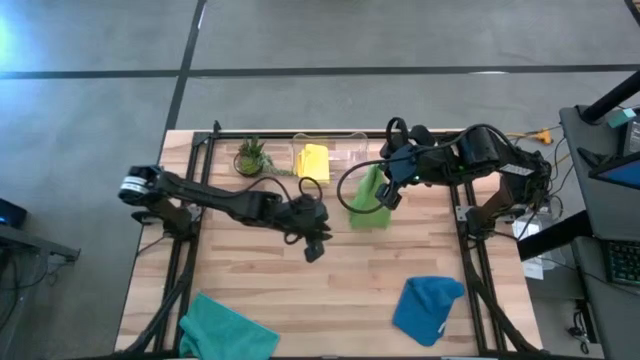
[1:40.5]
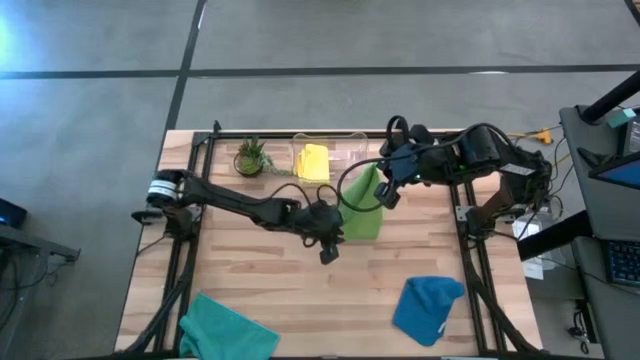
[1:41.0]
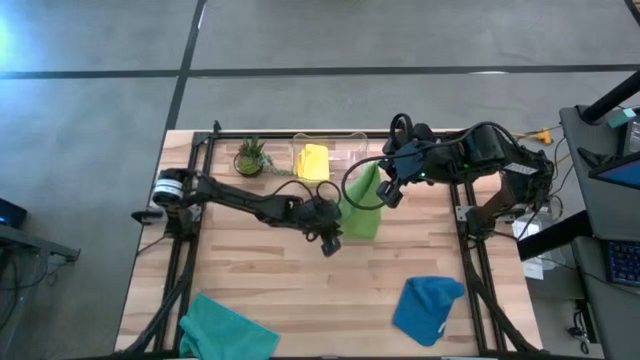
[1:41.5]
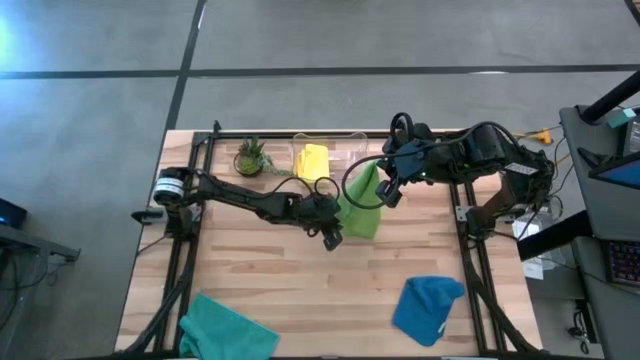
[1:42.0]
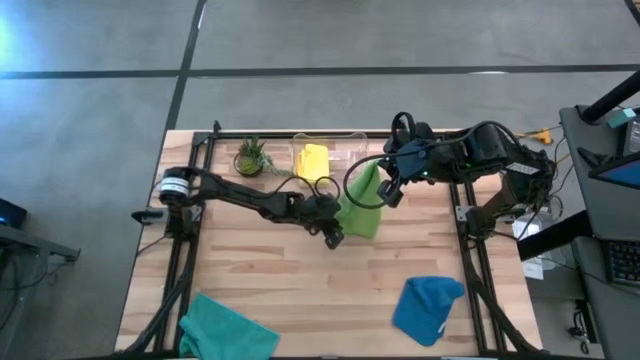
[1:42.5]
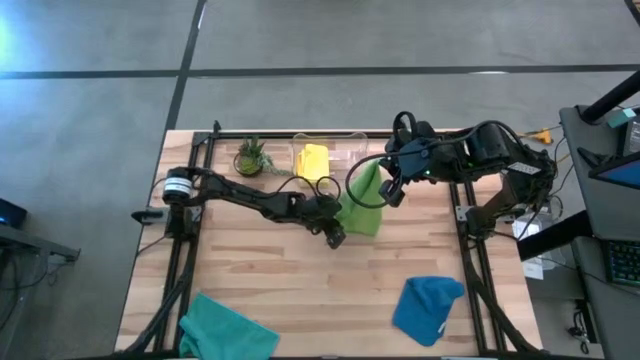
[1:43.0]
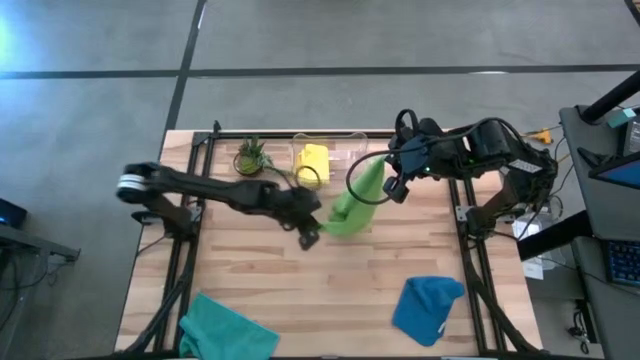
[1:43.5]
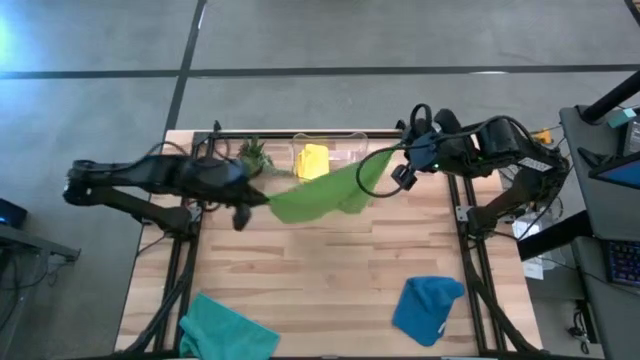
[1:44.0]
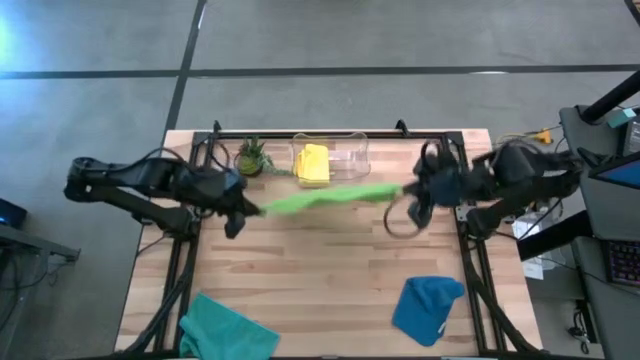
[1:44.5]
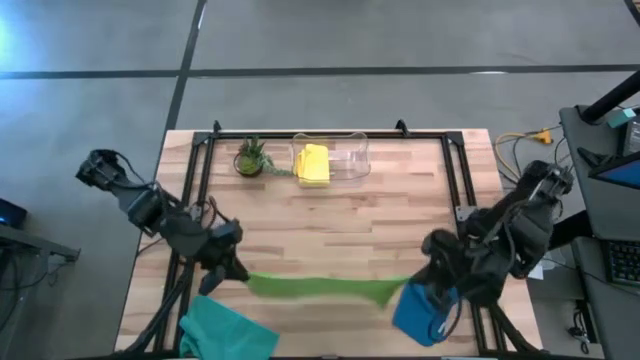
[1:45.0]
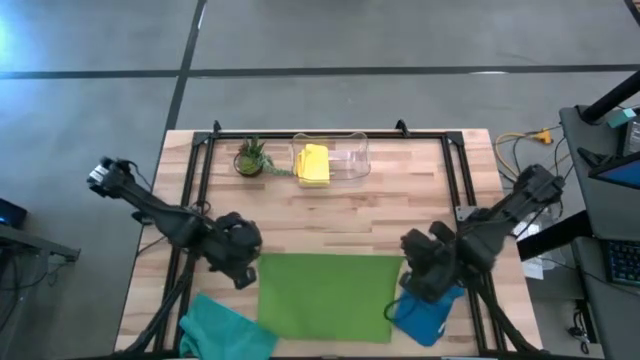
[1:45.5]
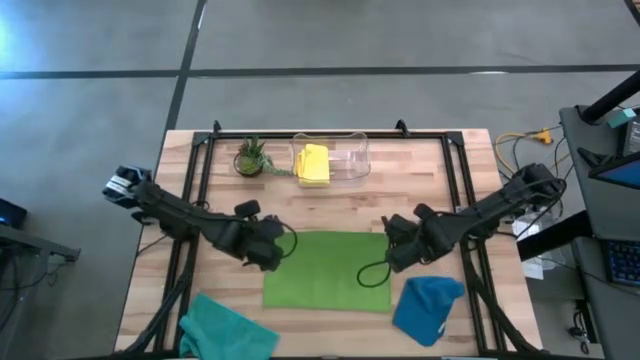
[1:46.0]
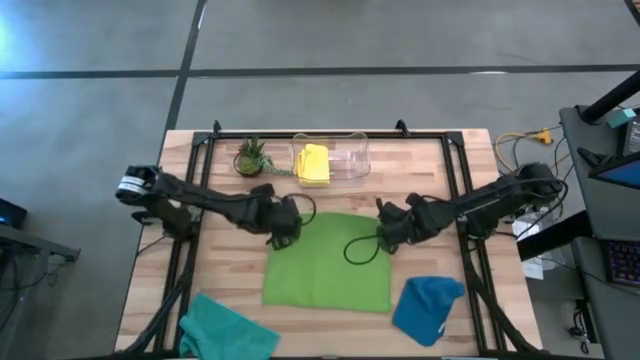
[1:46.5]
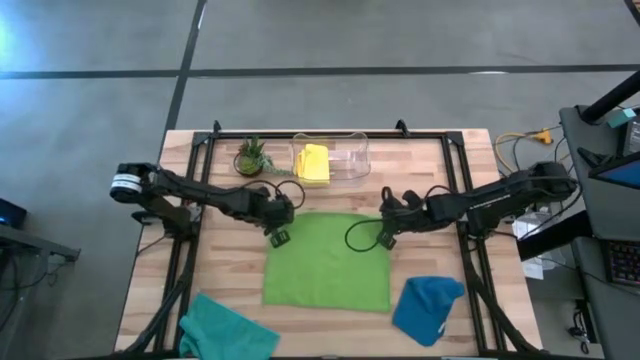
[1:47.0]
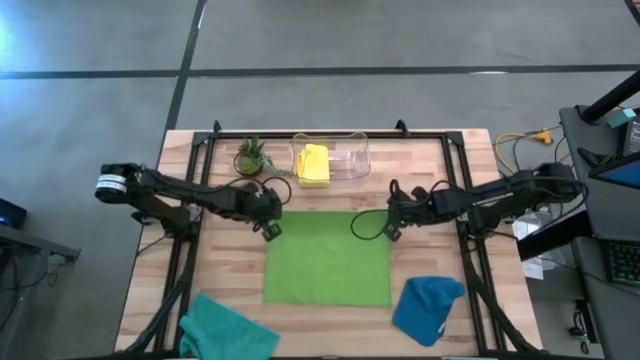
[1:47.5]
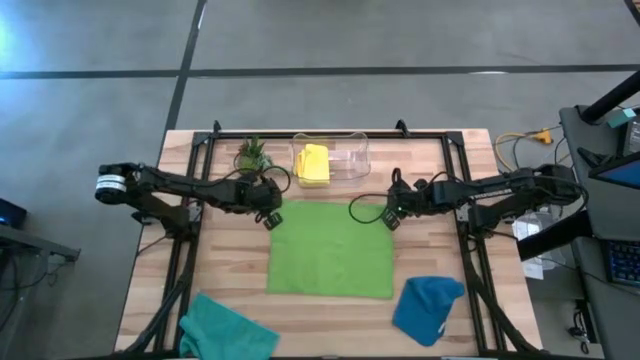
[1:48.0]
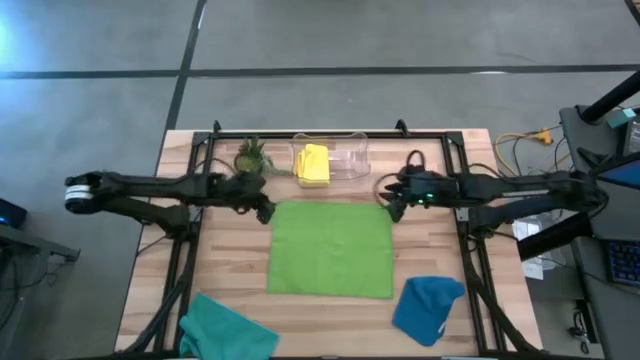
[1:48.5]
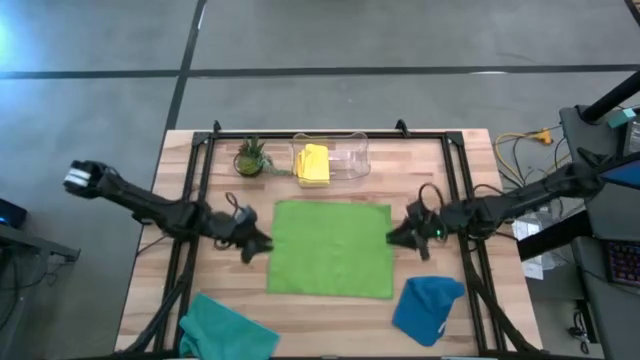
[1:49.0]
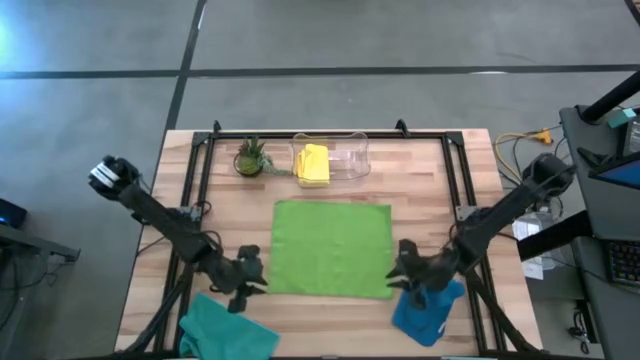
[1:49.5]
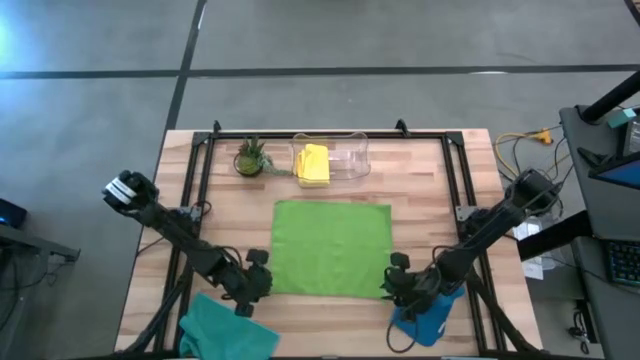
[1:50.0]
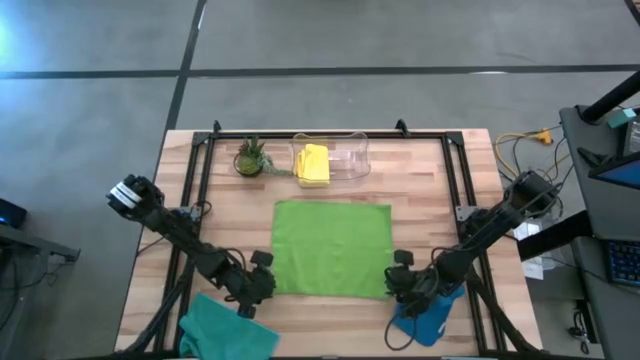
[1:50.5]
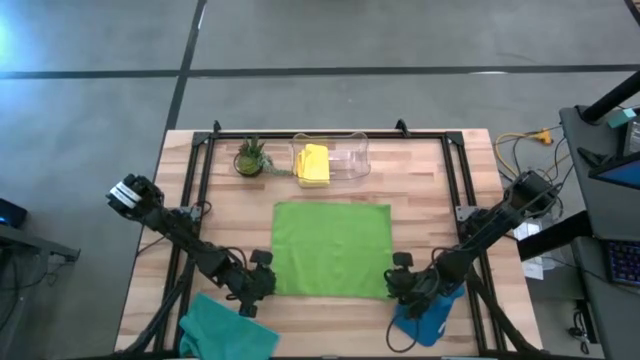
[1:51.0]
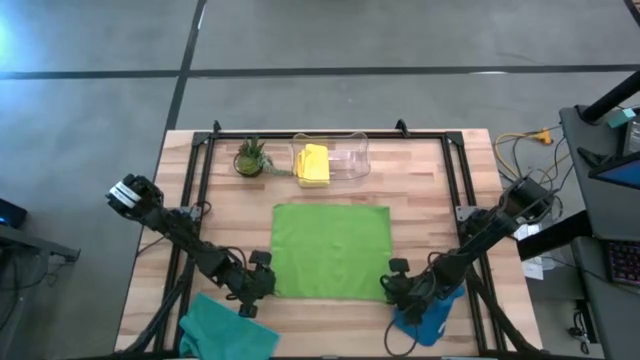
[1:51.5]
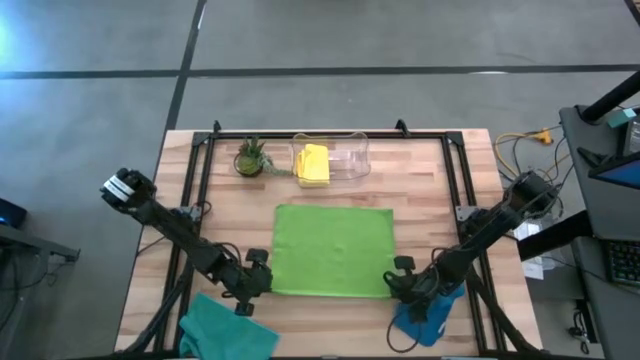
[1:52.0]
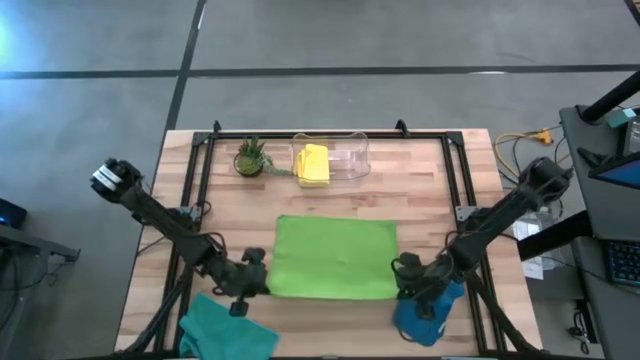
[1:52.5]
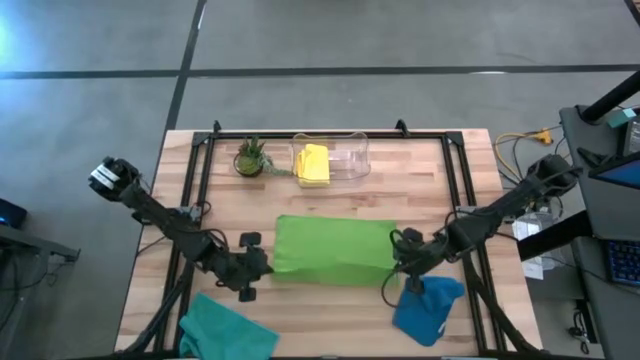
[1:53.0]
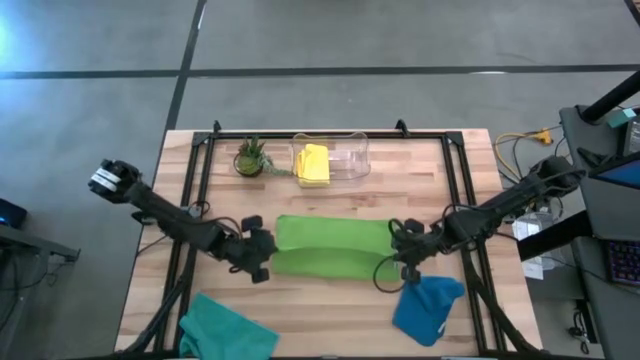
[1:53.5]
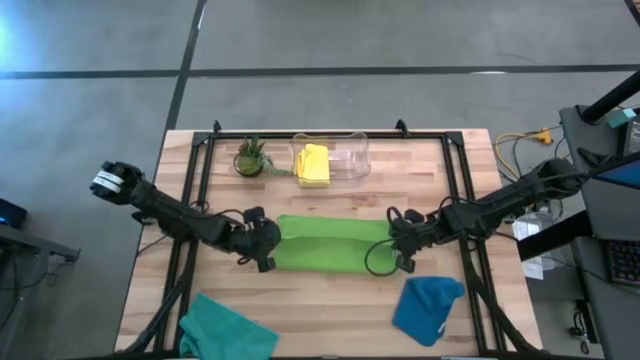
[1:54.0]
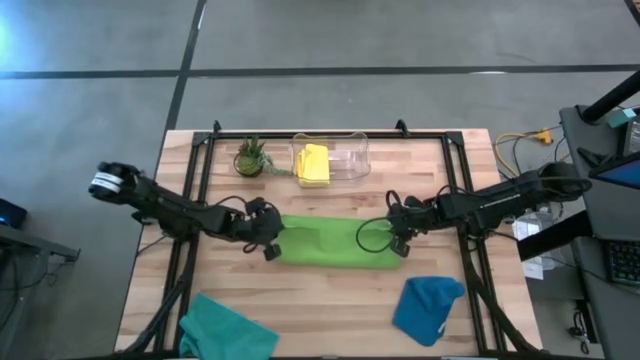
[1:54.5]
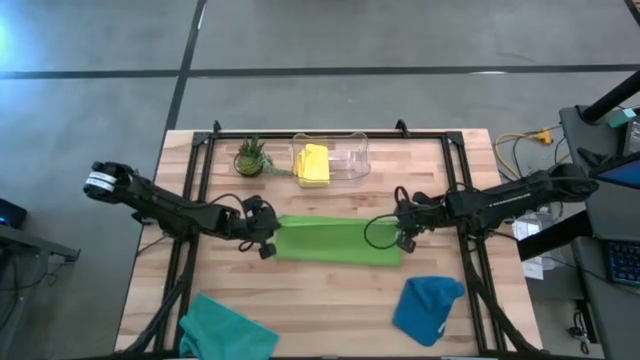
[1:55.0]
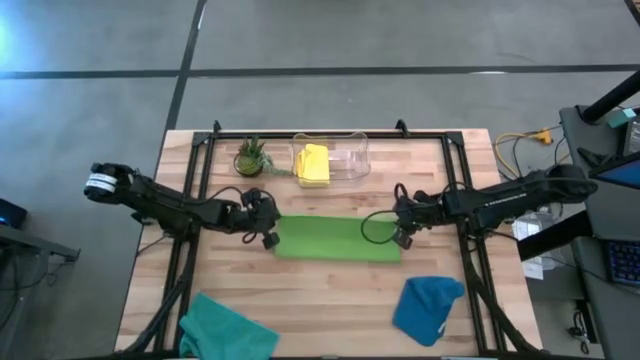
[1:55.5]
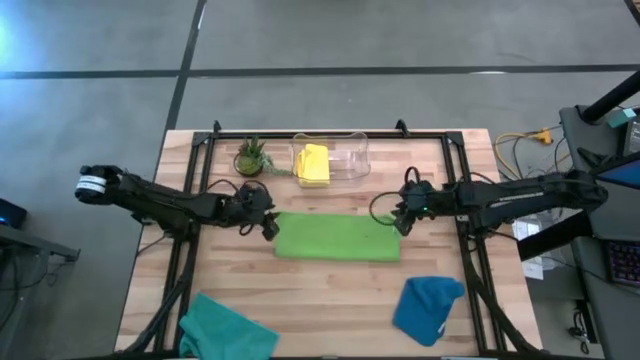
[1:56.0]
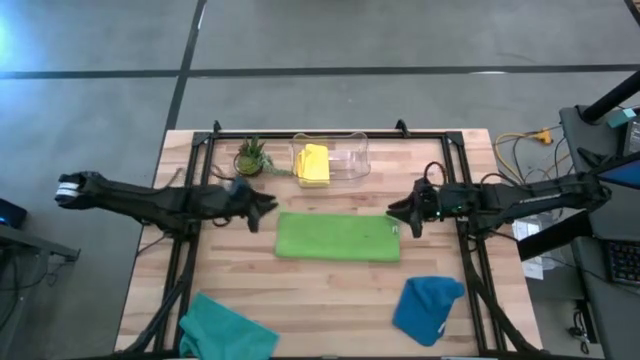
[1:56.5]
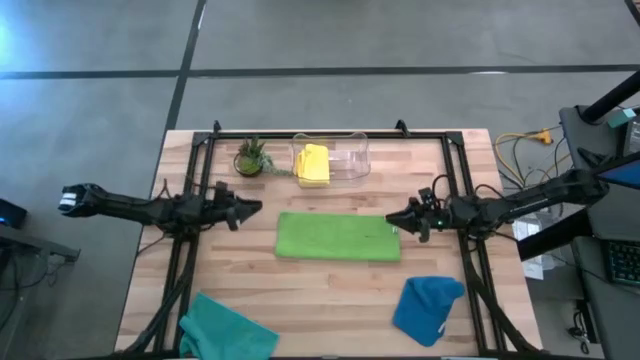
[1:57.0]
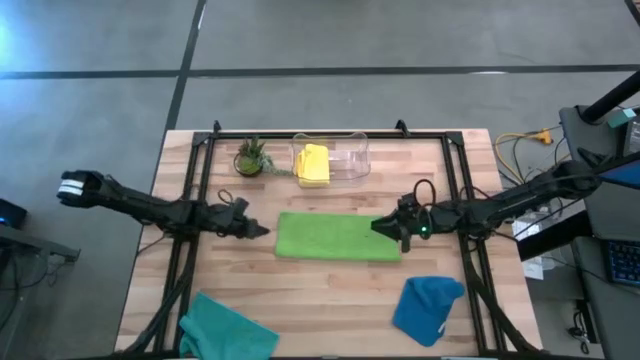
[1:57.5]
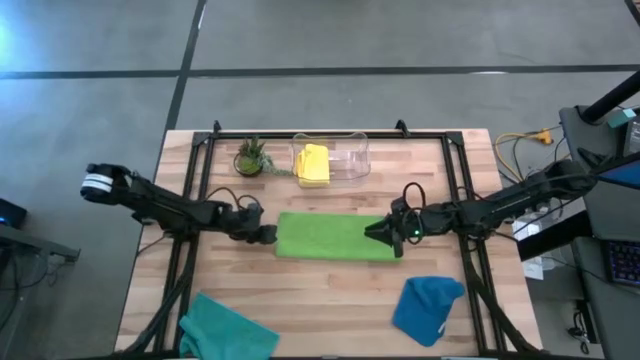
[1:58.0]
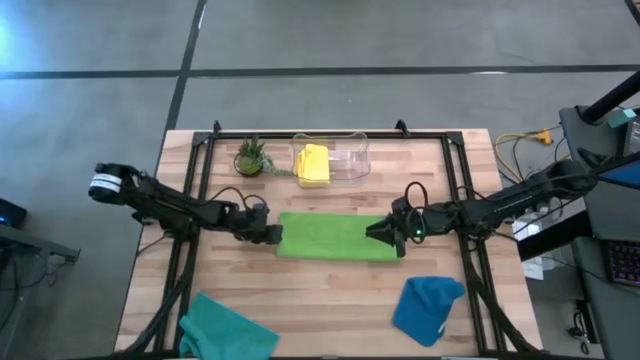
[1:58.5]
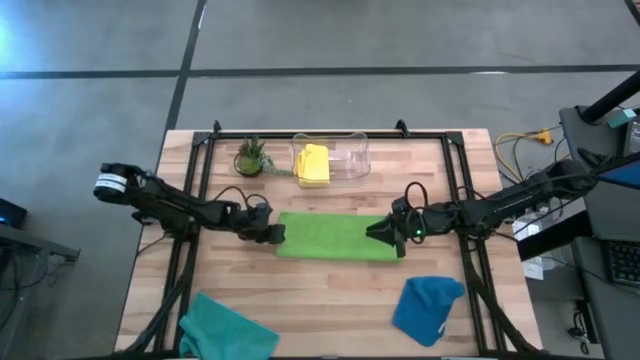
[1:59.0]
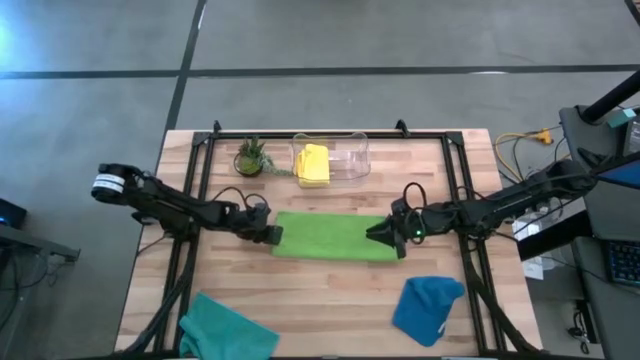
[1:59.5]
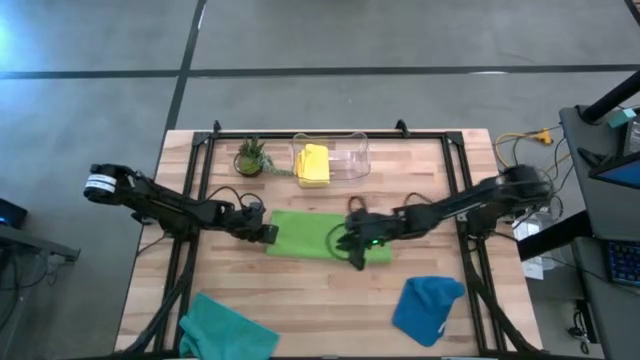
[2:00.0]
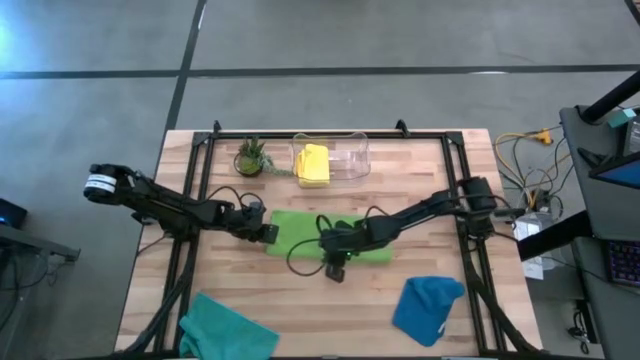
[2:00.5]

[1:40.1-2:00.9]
Task: Fold microfiber towels
Fold the green microfiber towel

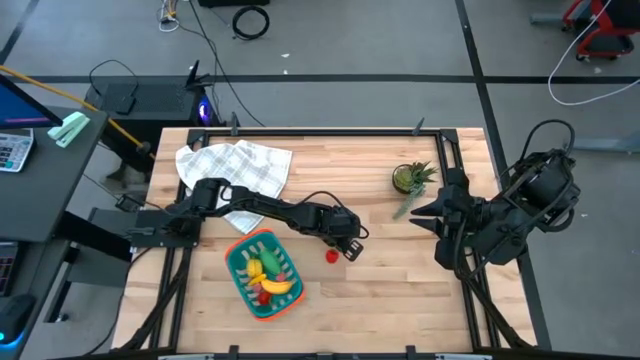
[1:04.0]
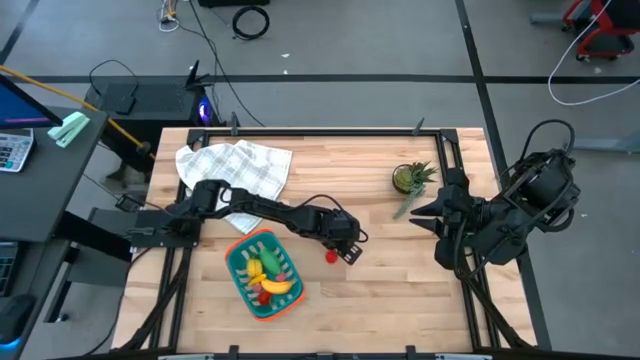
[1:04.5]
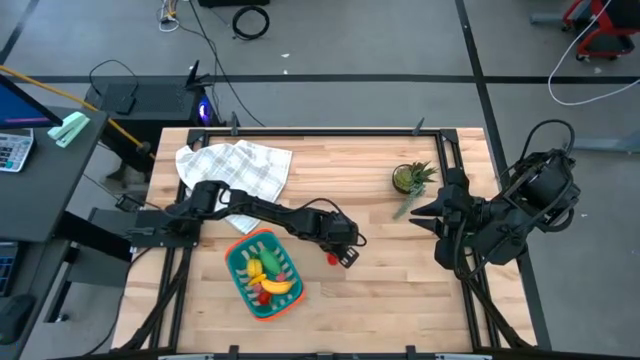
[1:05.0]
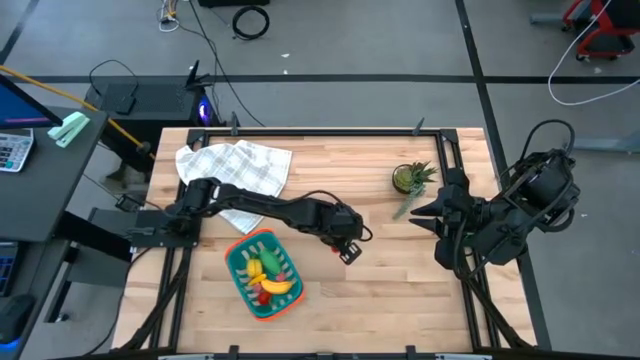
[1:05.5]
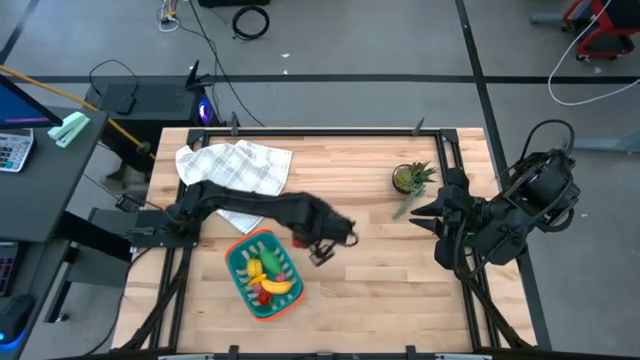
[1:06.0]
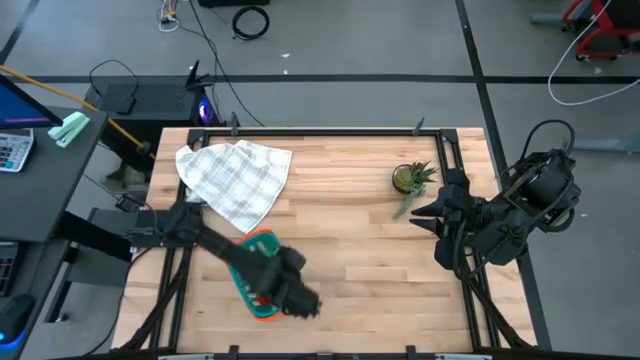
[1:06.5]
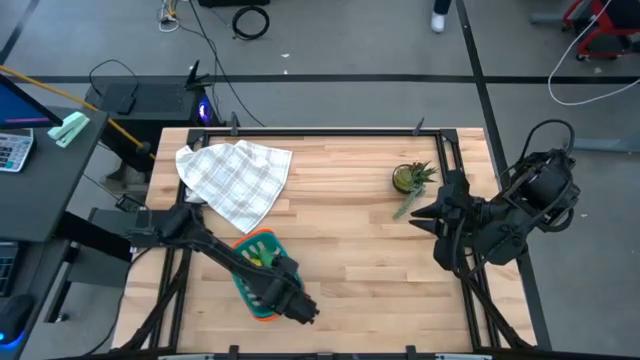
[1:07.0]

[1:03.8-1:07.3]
Task: Pick and placing Produce into tupperware
Put the red strawberry into the blue basket
